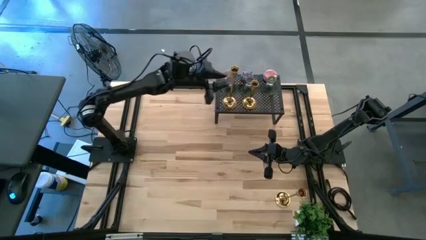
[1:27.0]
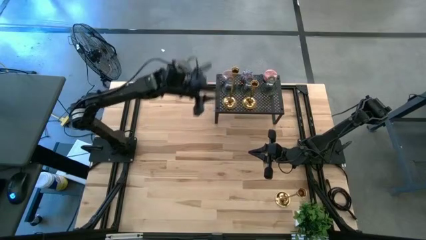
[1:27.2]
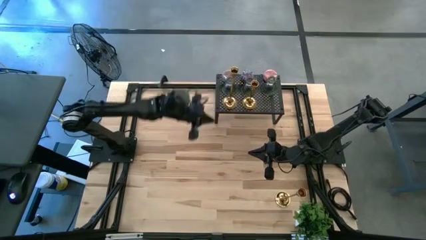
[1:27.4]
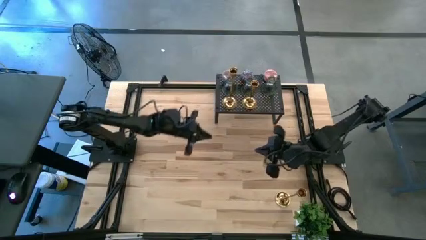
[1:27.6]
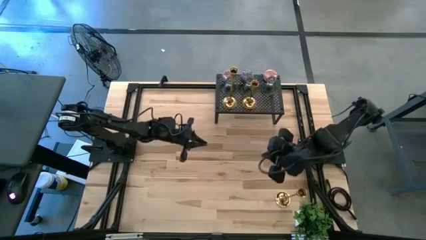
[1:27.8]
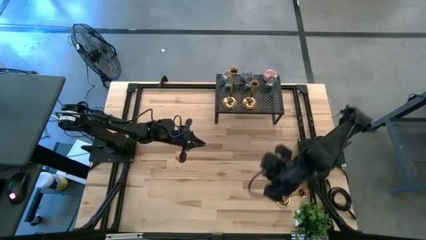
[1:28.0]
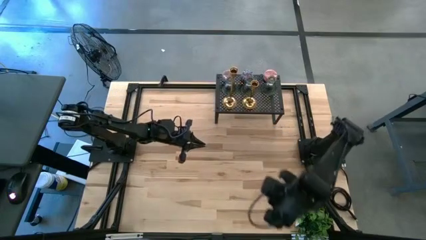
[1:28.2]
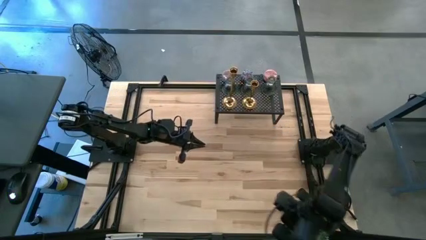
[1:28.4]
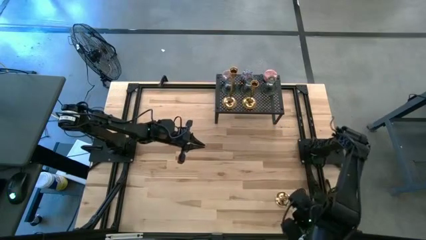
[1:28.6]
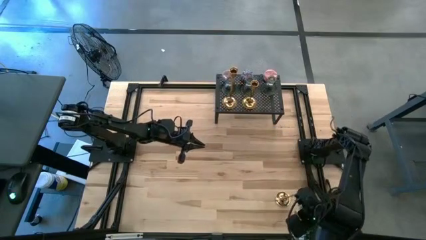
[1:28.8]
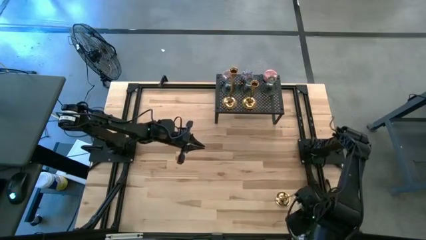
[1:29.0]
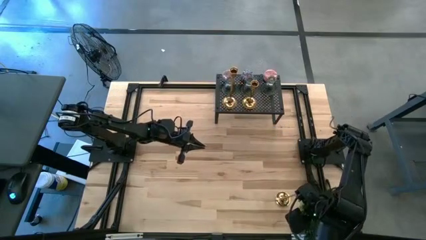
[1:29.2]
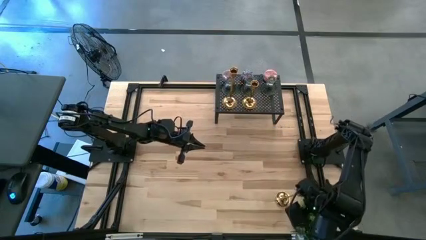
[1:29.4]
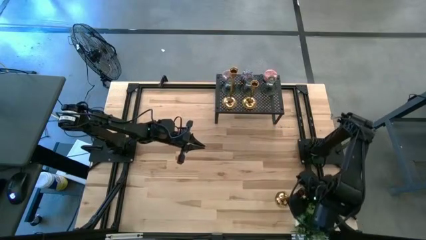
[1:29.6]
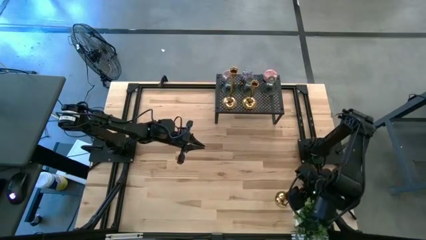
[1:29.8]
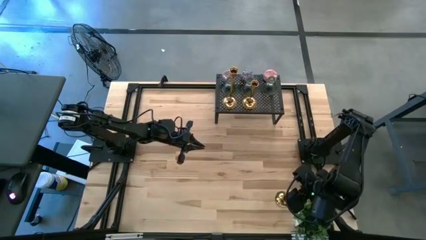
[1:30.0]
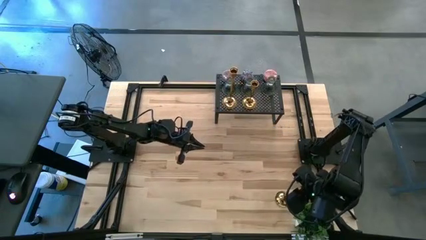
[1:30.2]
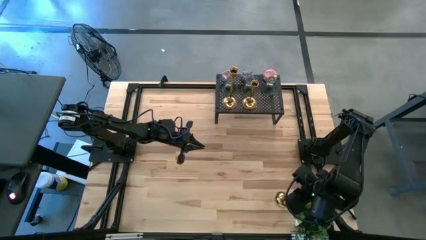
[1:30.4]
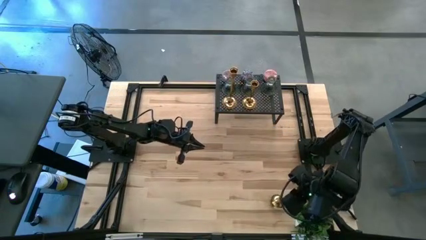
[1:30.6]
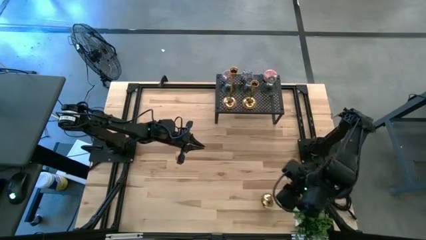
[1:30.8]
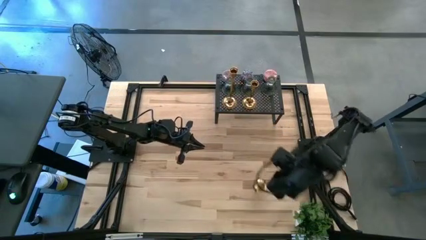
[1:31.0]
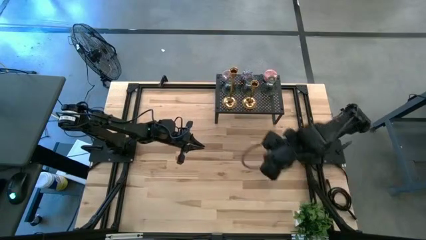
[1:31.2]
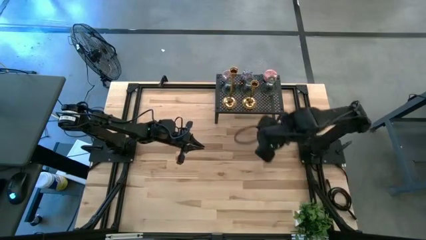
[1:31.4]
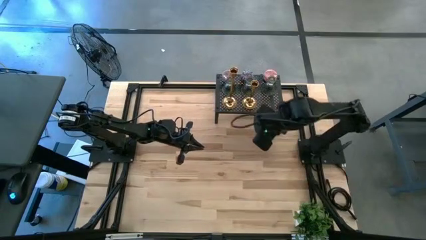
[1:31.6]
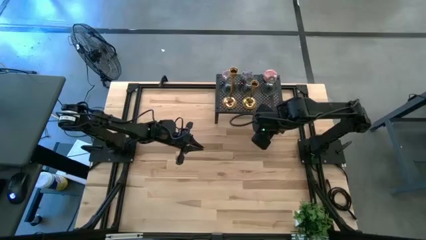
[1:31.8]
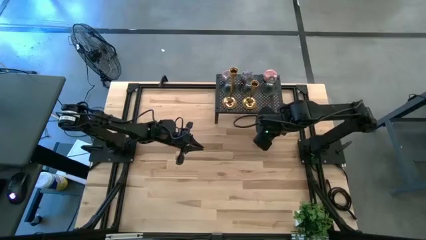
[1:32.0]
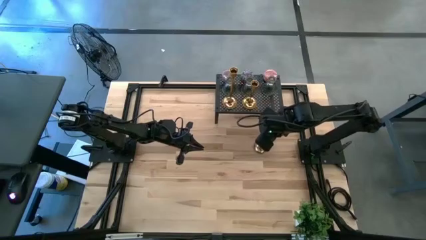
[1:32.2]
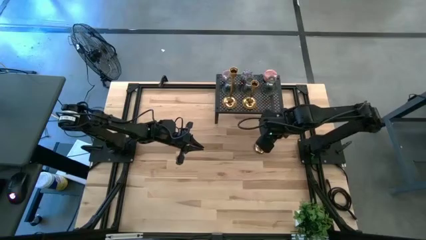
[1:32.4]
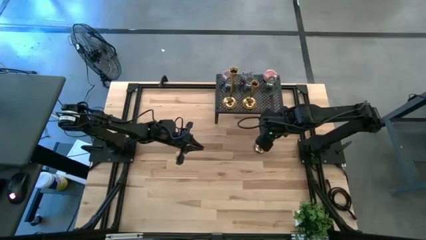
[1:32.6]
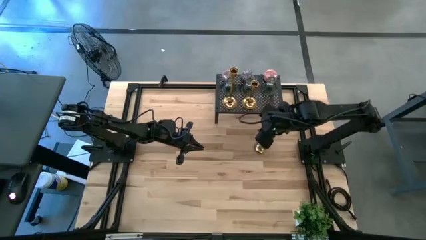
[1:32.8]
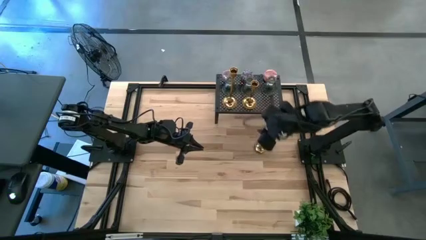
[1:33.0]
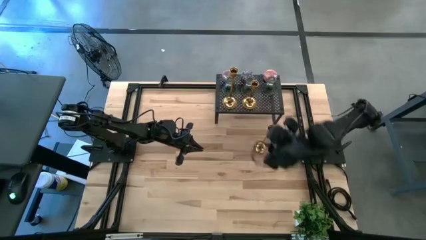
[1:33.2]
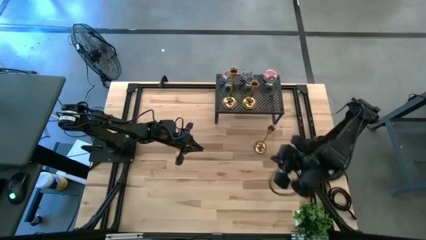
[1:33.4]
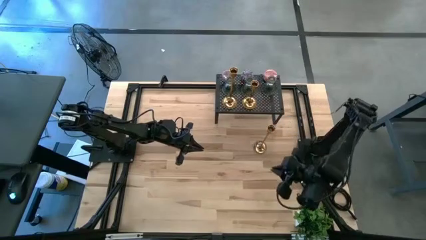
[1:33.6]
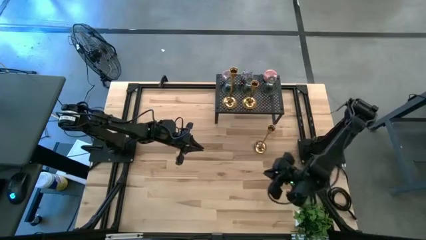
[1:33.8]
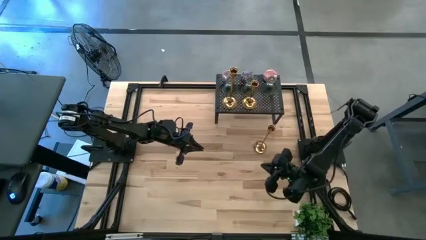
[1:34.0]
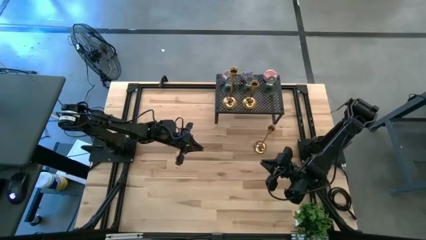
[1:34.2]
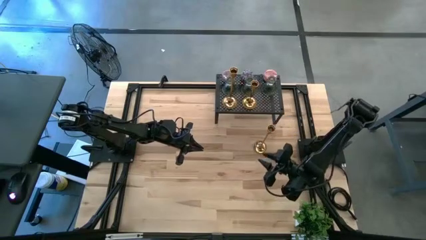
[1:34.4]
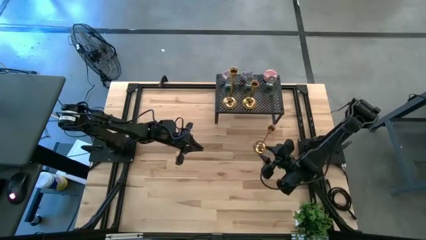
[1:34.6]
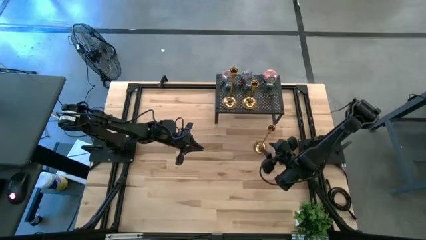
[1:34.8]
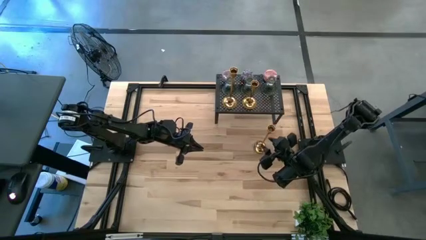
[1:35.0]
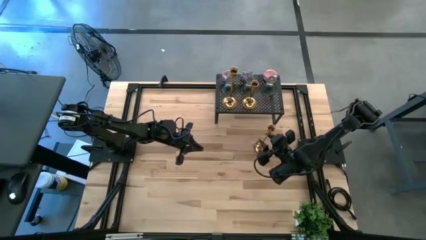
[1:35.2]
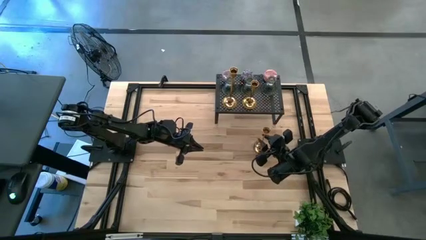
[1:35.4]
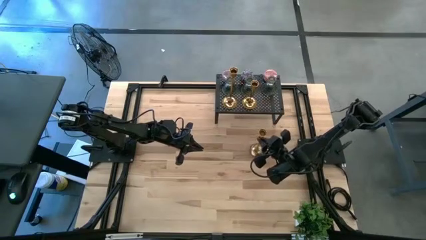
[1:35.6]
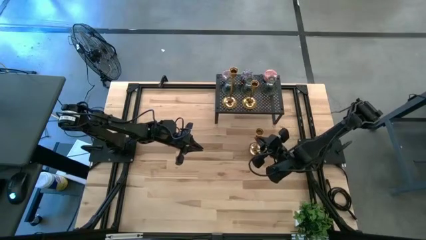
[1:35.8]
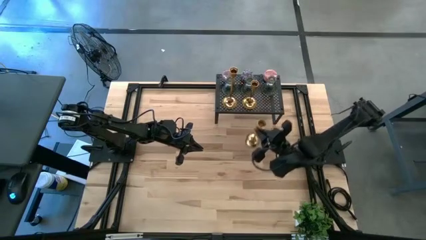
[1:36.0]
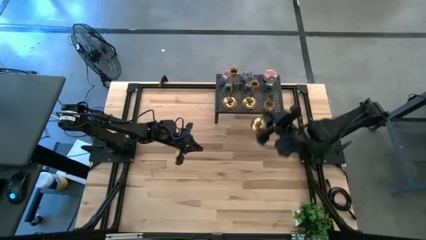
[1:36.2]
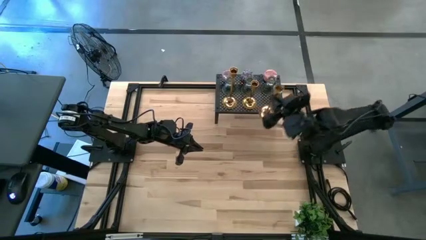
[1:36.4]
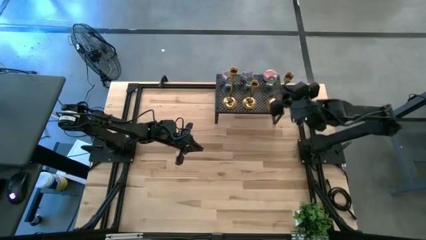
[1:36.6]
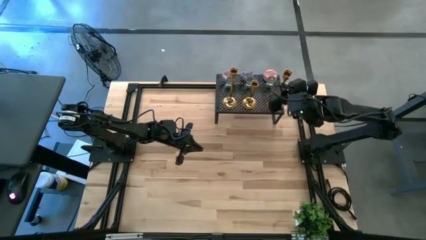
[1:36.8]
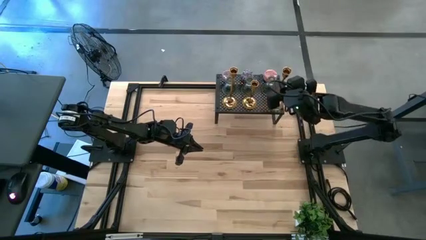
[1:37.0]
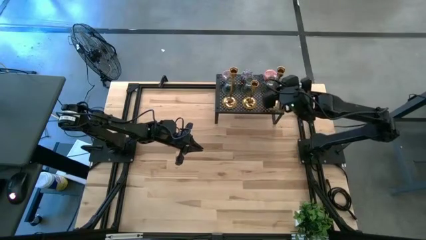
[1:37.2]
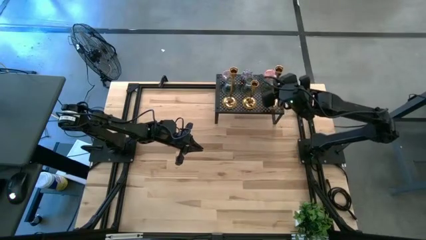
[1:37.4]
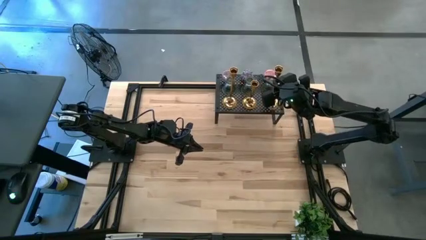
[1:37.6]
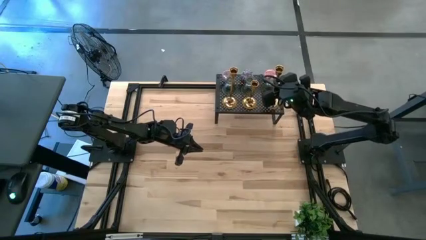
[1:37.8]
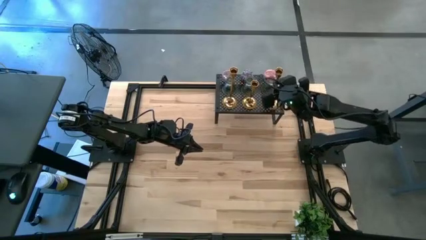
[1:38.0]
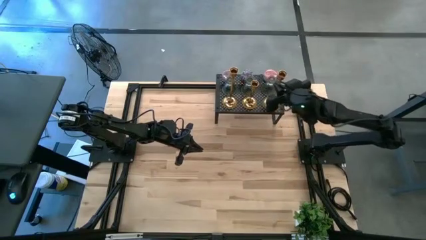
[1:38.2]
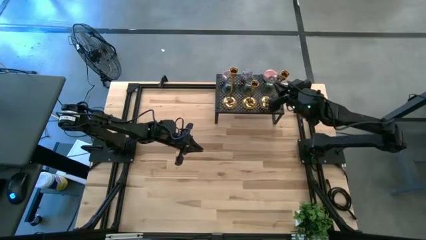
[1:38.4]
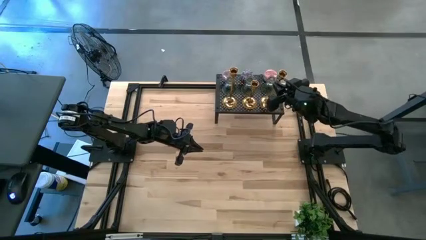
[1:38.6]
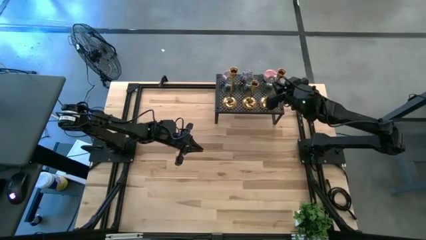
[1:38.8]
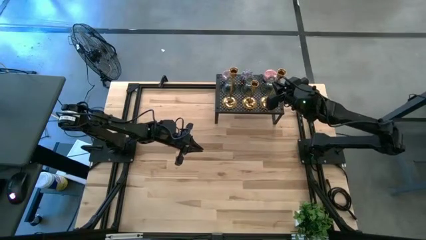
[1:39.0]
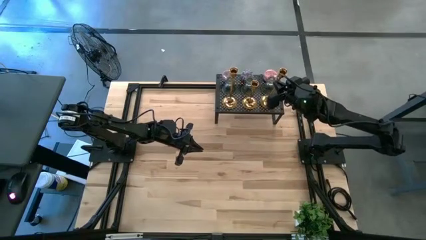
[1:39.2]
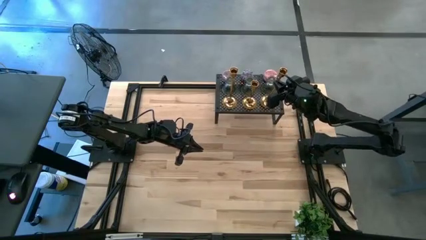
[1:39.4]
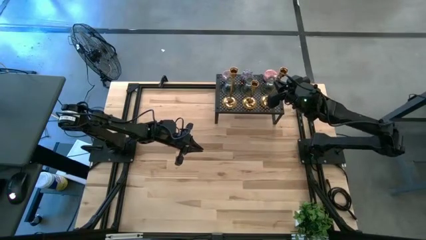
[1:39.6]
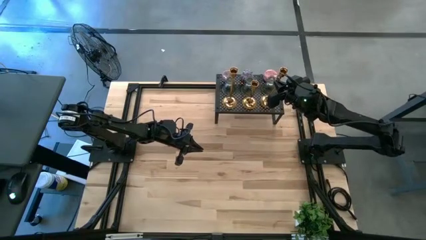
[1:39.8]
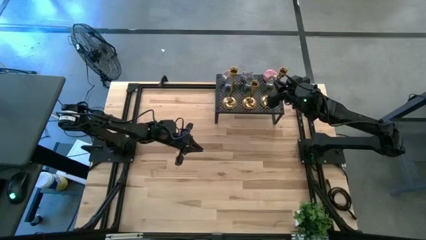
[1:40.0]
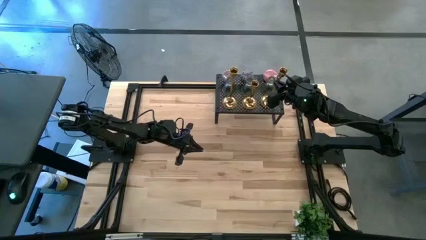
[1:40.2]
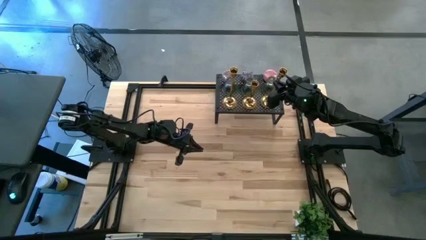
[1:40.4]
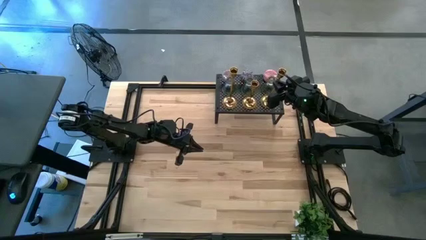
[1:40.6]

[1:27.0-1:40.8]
Task: Pick & Place candle stick holders
Put the metal candle holder on the shelf

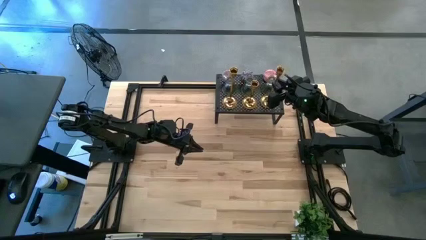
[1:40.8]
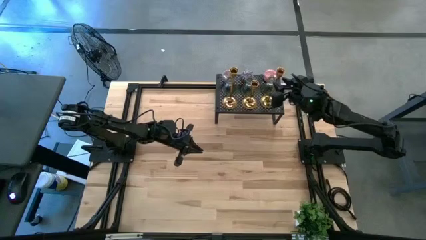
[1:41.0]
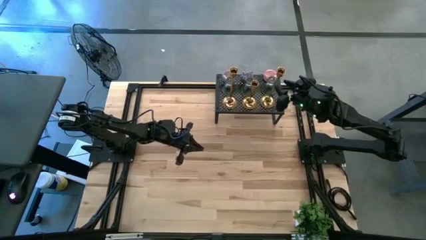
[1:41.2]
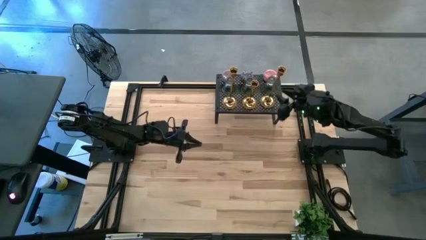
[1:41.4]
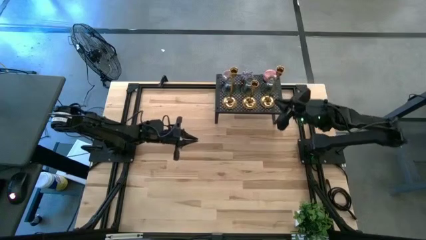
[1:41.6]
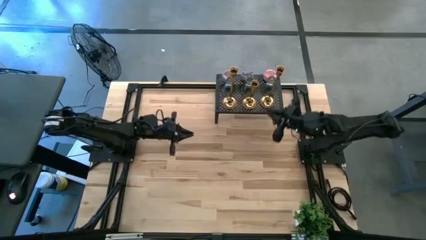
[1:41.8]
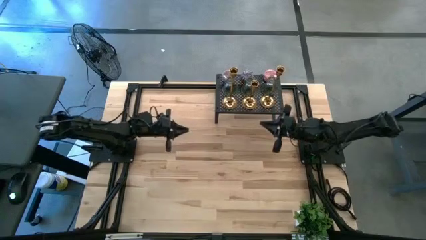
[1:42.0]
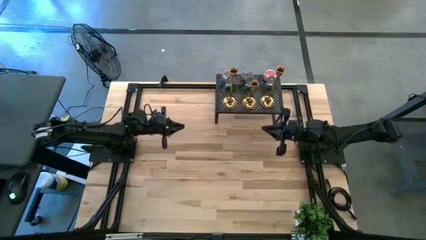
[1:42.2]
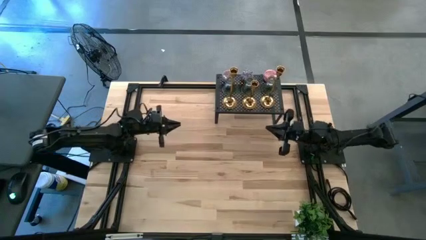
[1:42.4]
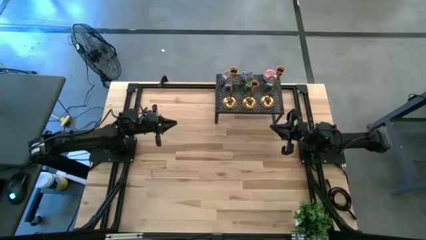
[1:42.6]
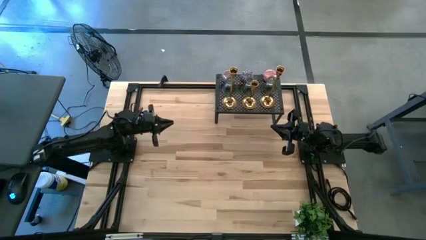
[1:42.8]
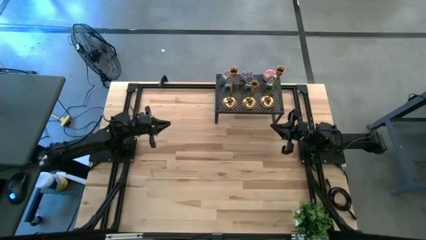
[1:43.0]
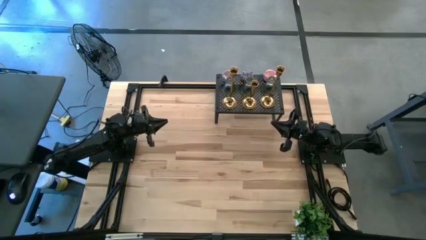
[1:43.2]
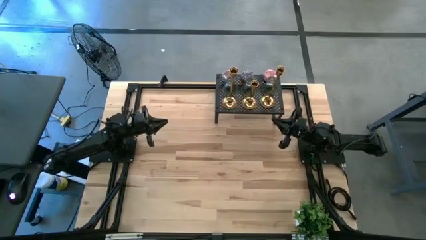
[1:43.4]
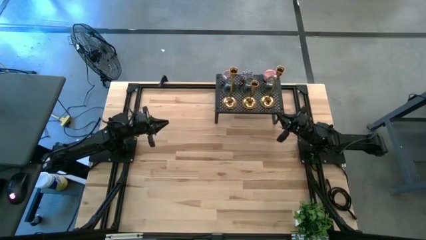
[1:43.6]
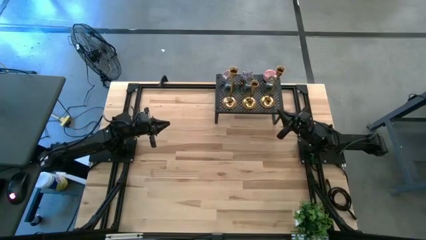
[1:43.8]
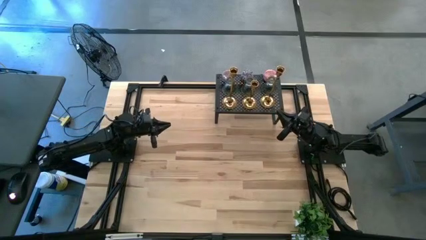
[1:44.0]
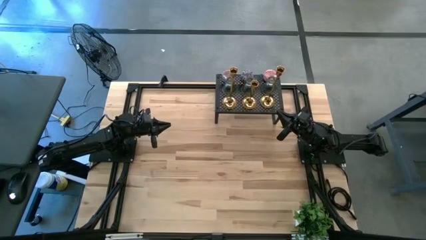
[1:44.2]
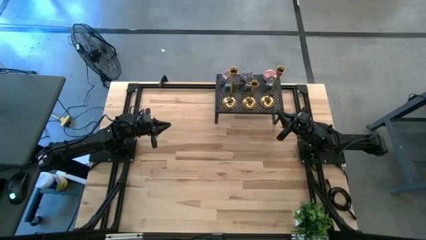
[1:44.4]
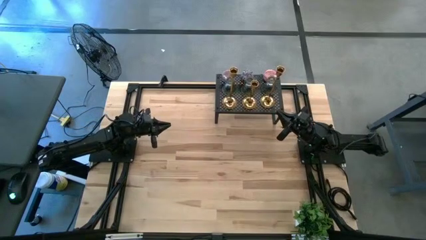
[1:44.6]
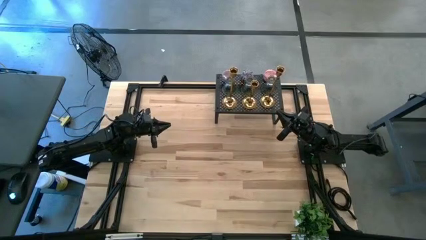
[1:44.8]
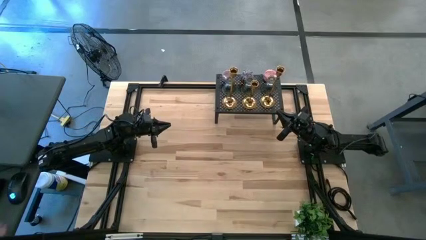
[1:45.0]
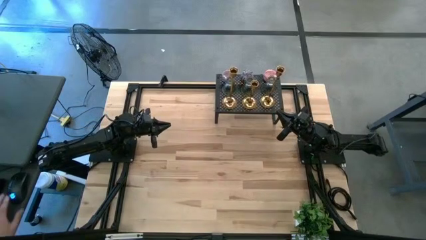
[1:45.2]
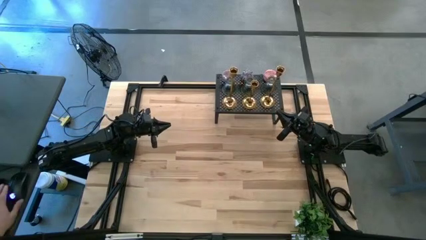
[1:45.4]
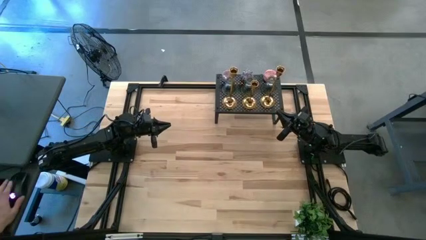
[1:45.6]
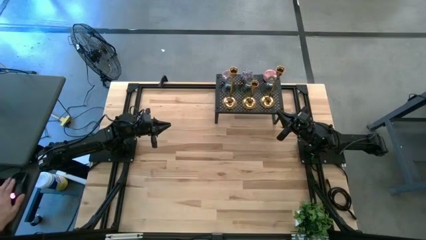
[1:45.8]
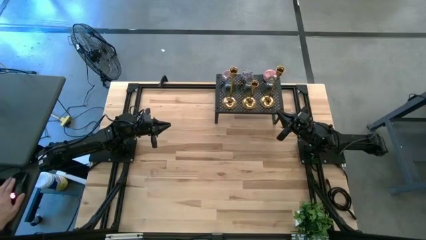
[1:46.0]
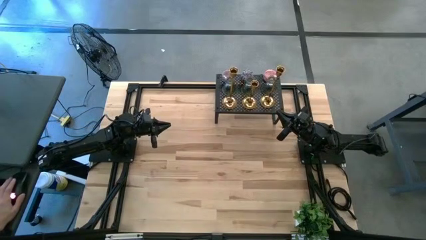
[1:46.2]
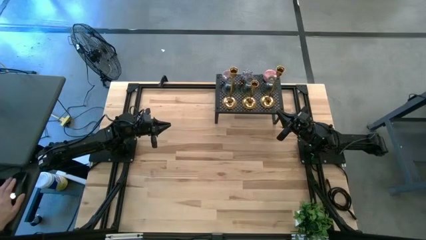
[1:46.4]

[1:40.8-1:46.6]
Return to Home Position
